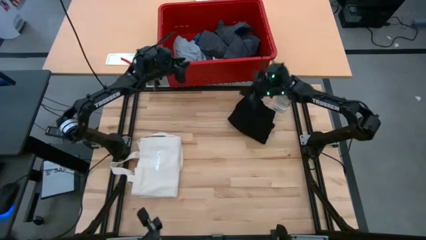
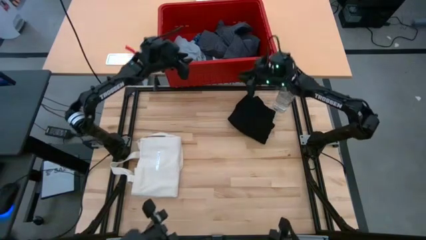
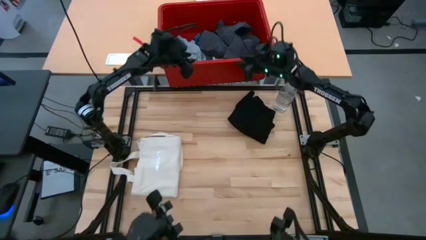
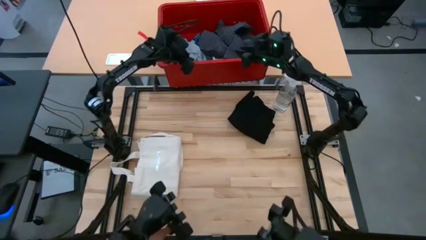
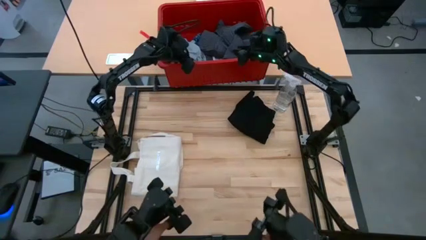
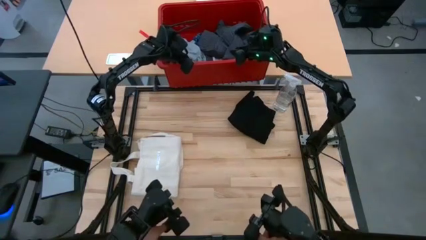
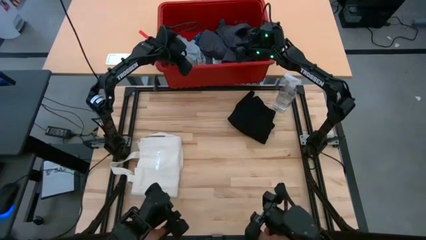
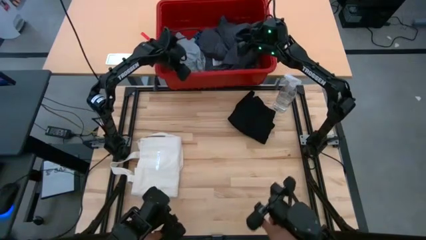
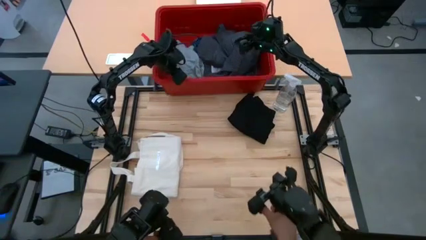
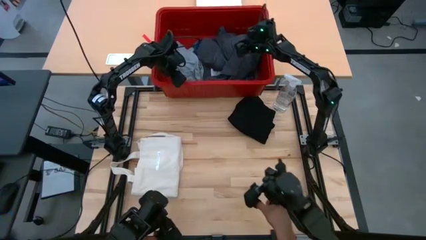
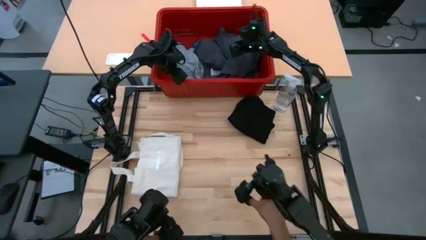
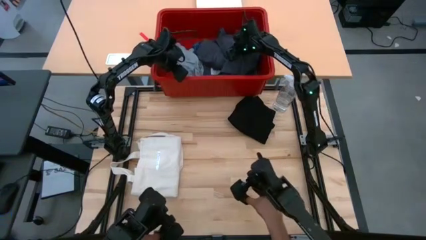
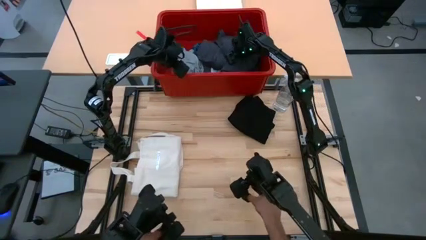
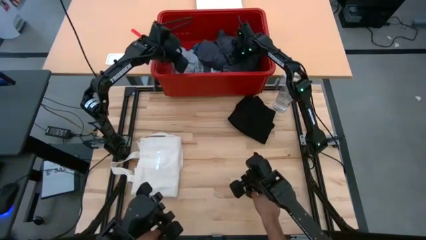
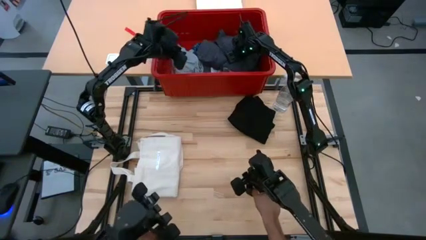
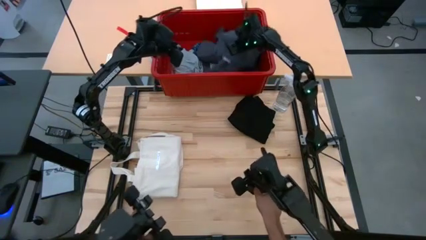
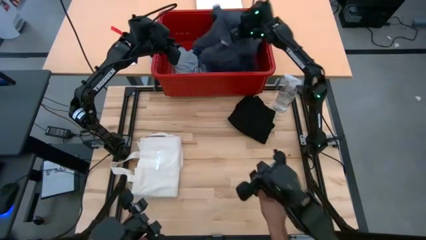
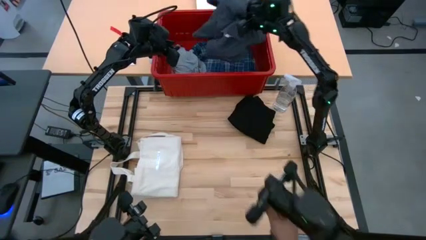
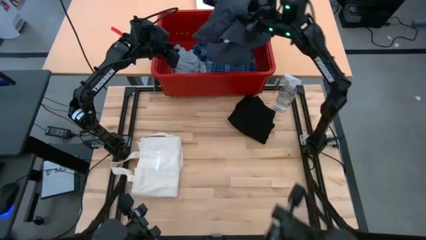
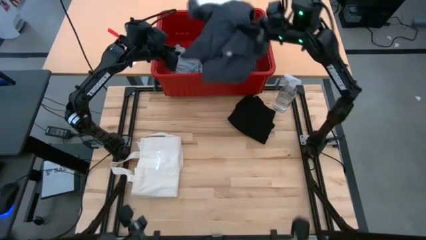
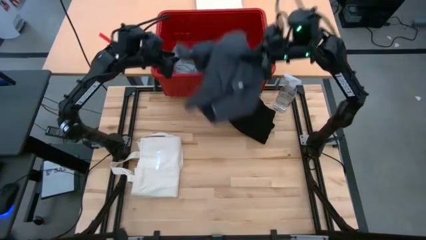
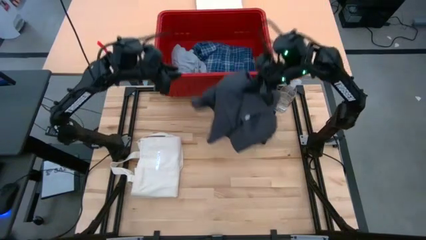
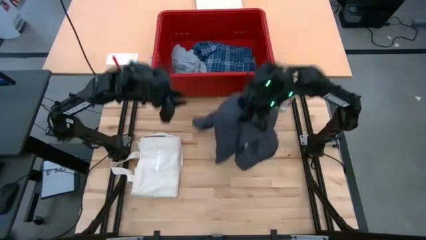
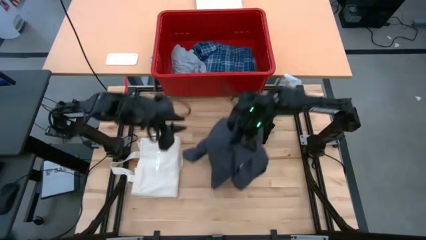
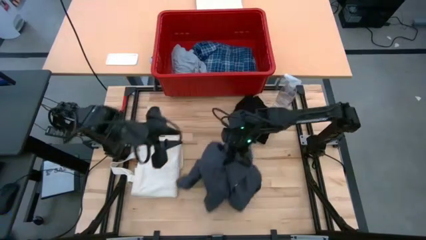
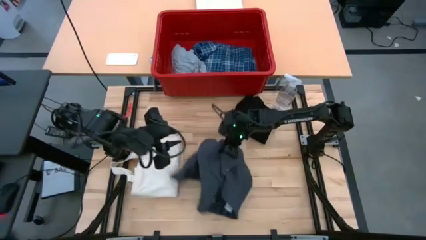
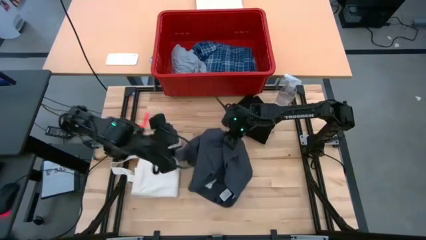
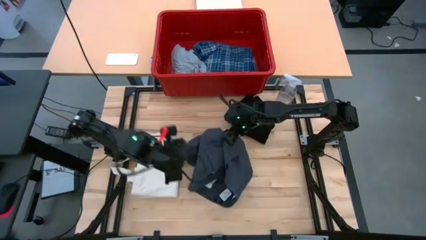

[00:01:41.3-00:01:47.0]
Task: Fold Laundry from Bin
Remove the gray shorts from the red laundry bin

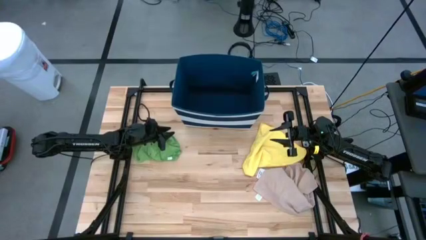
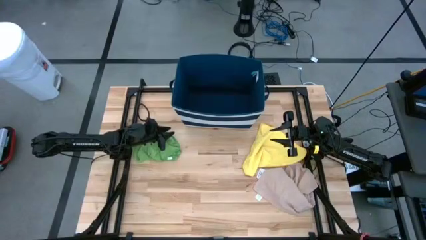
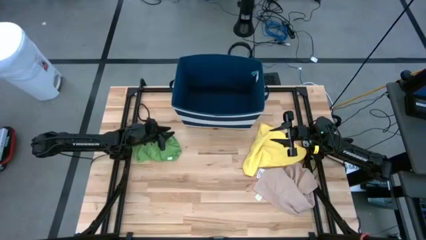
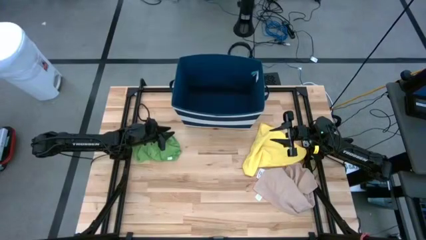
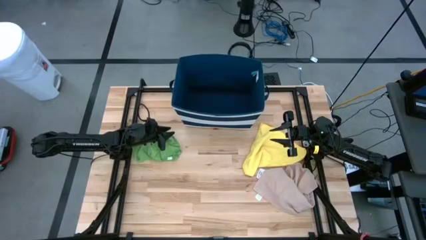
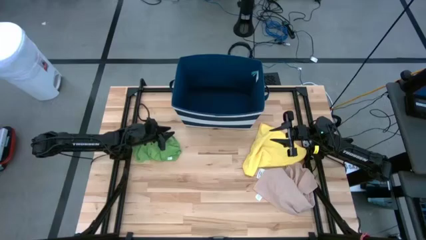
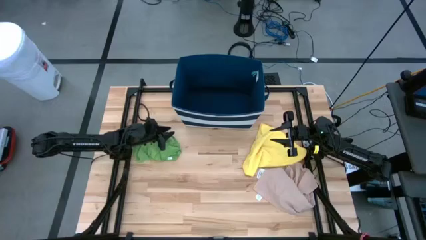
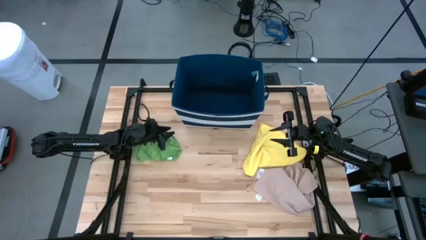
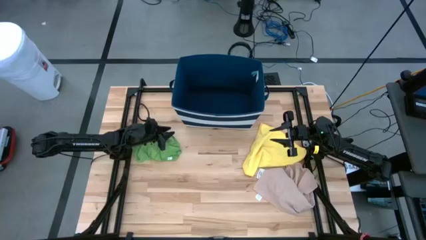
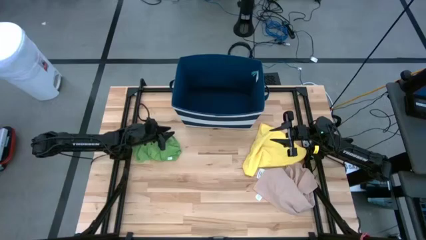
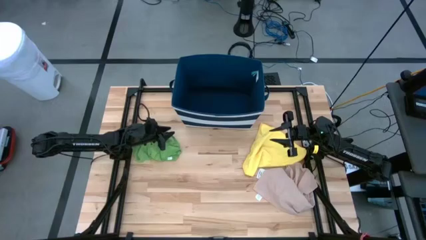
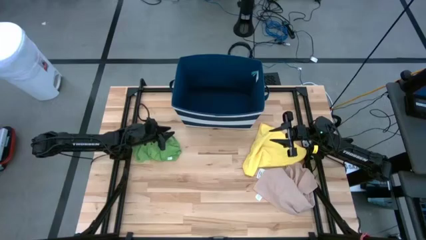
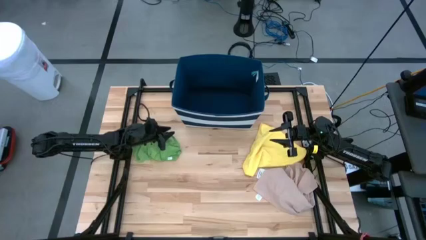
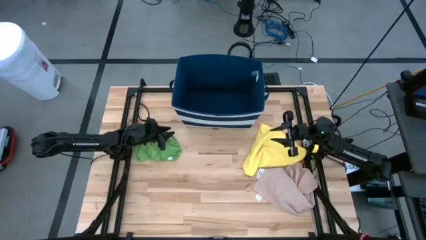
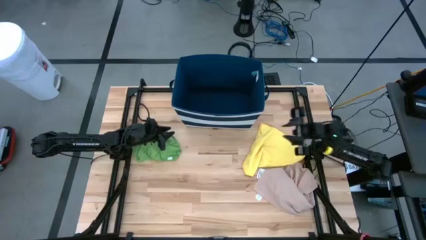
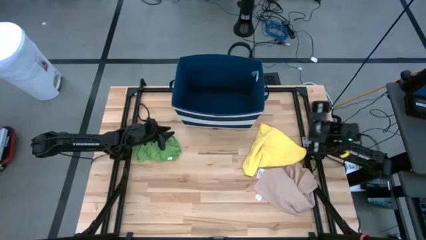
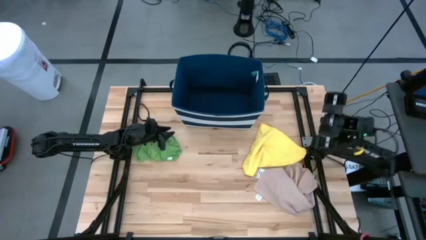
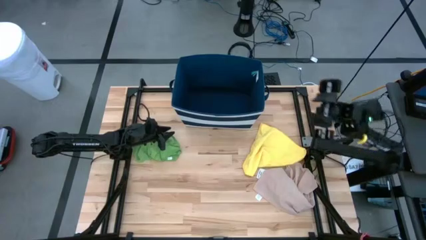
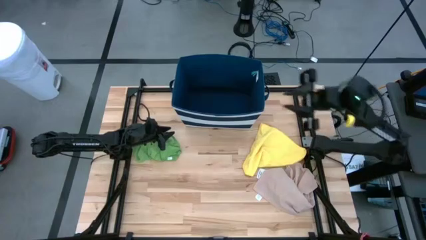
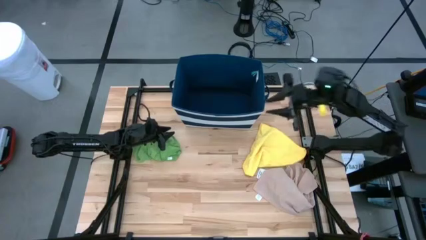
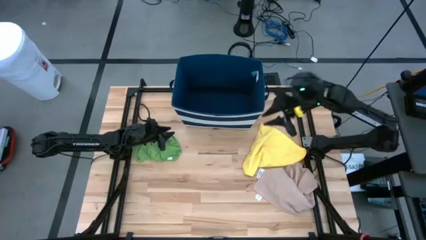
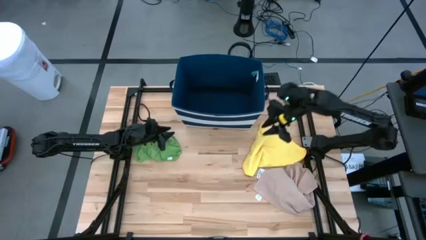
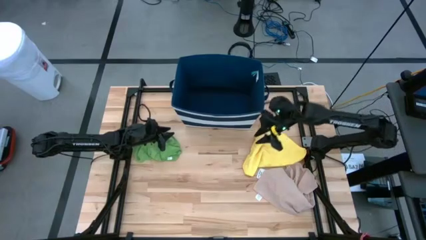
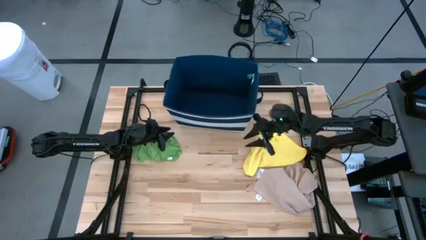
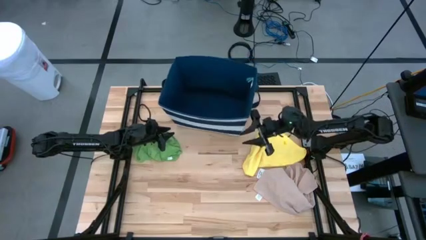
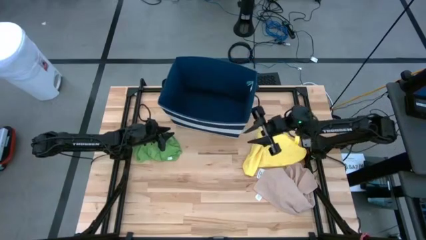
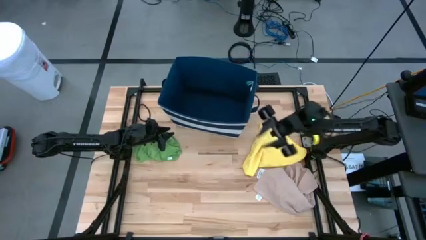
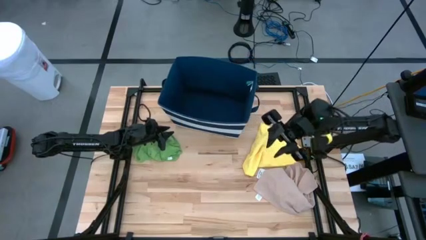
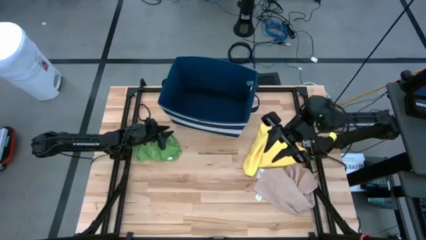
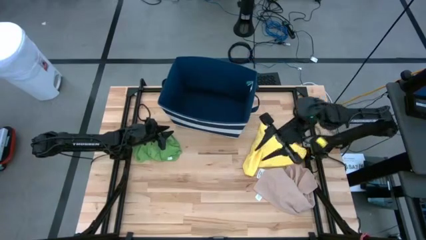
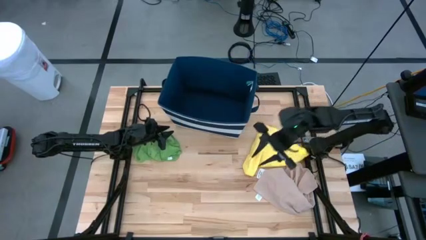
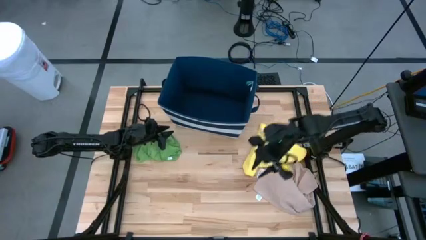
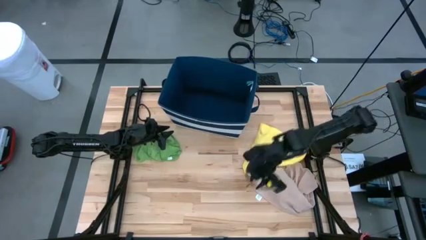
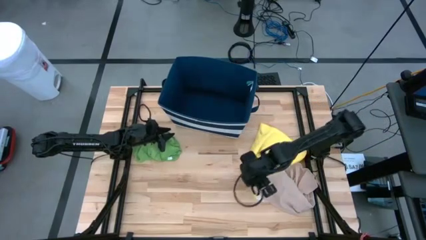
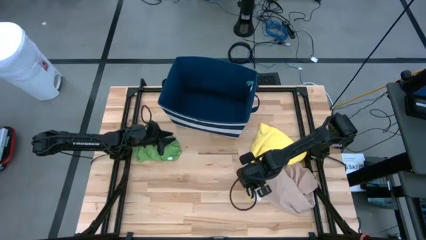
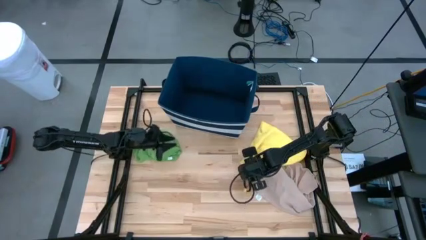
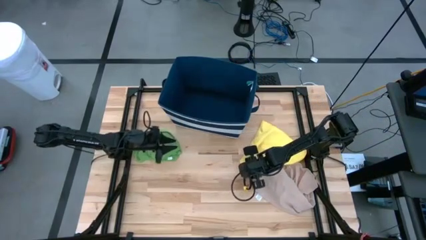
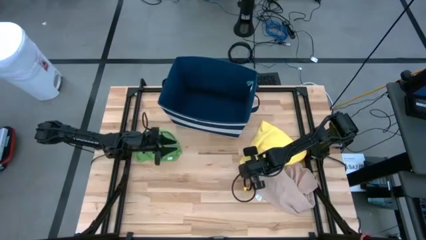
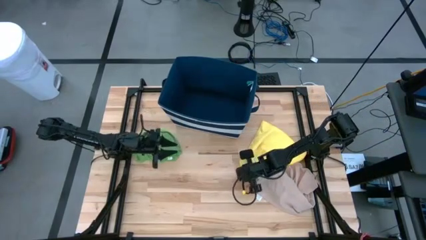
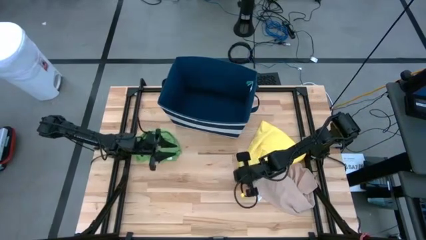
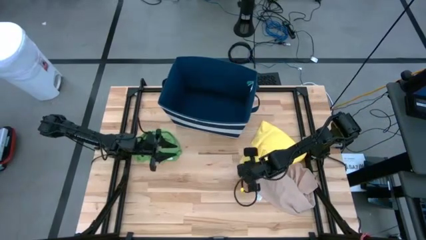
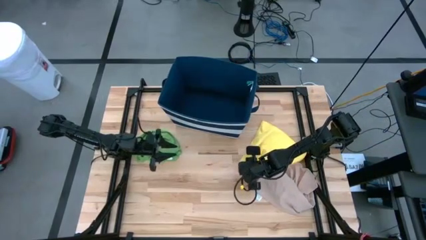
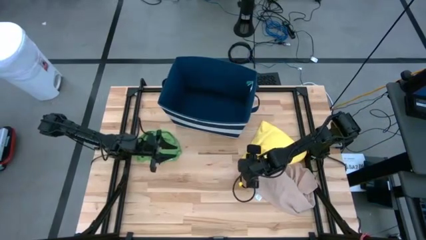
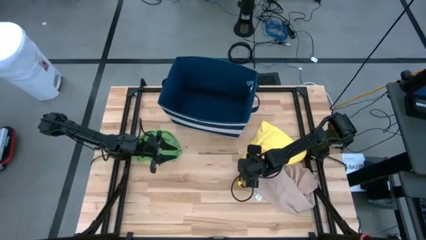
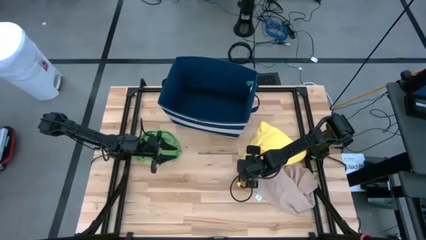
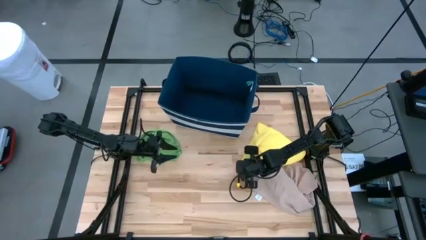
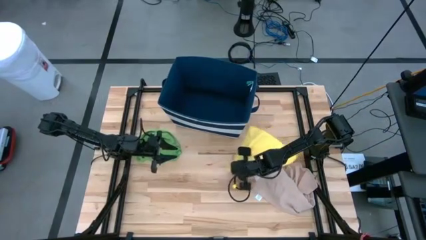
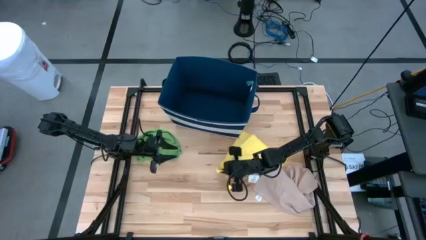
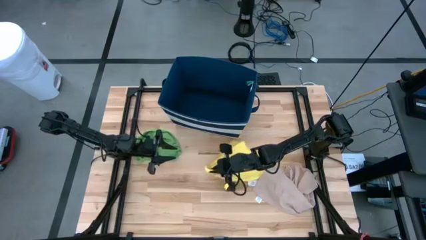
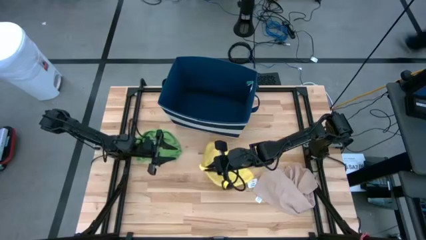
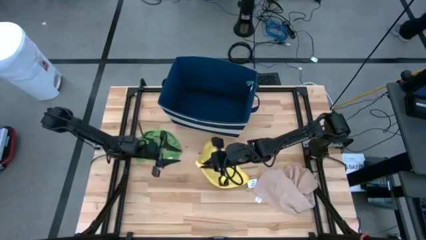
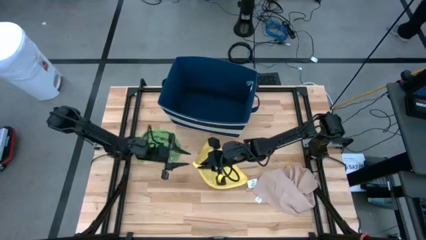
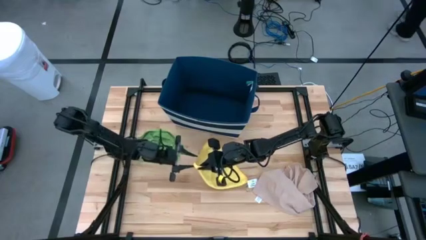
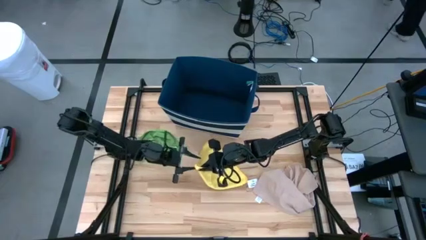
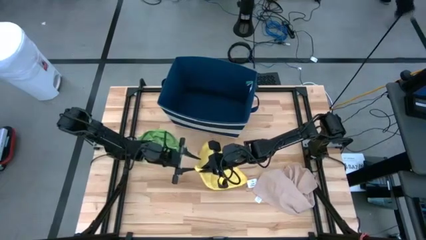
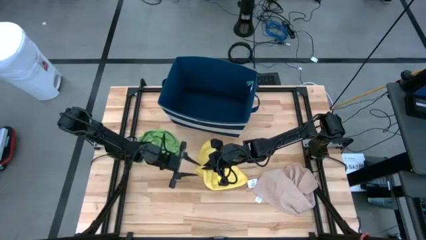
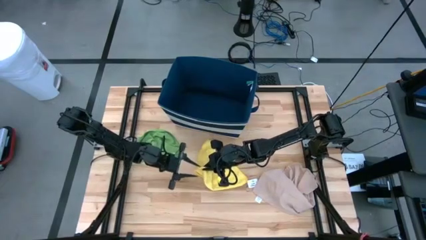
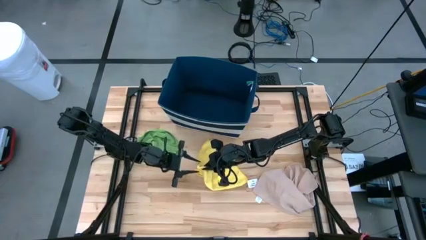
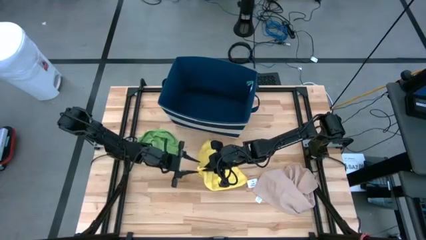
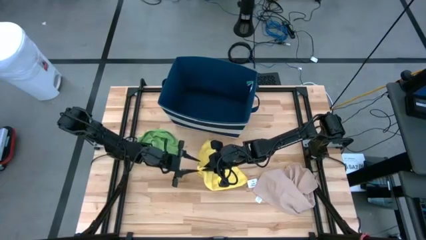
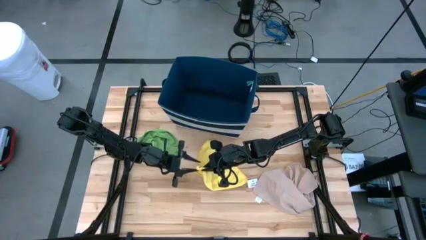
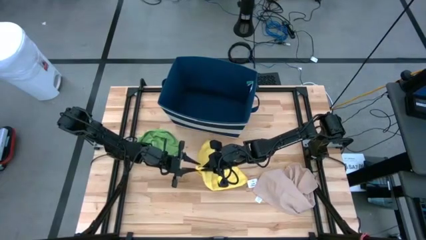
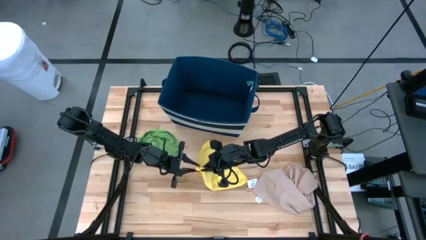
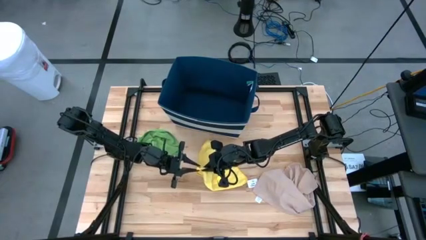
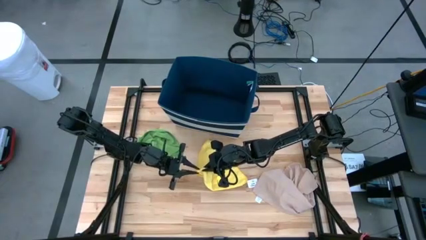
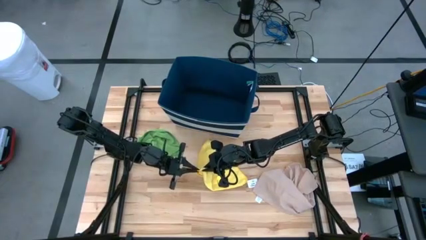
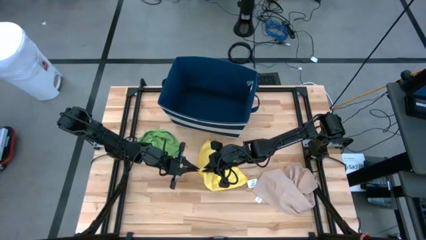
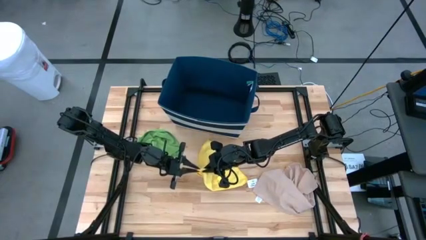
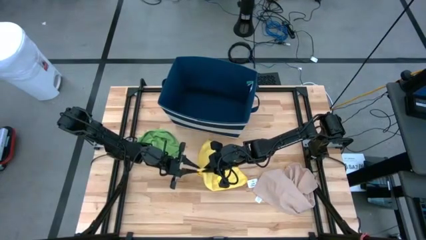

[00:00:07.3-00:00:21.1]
Task: Fold towel
Fold the yellow towel
